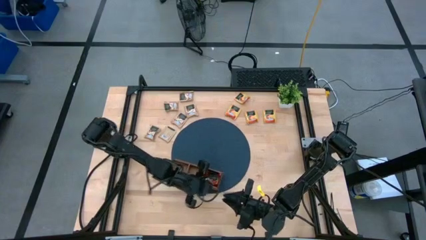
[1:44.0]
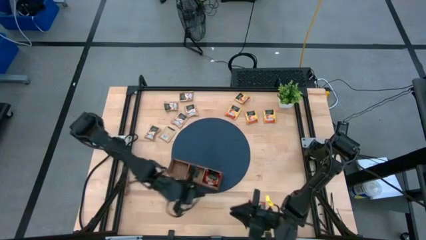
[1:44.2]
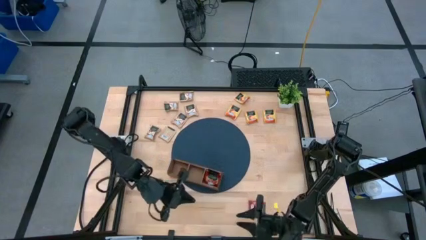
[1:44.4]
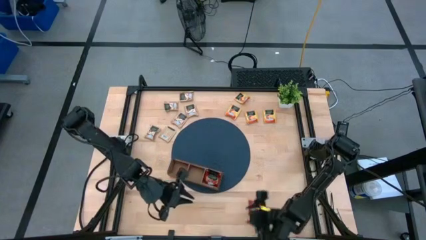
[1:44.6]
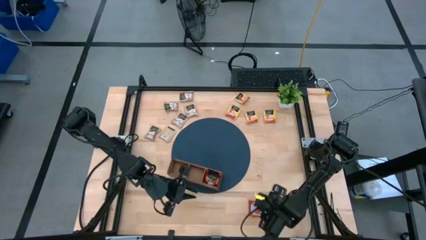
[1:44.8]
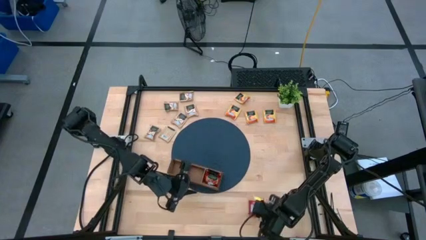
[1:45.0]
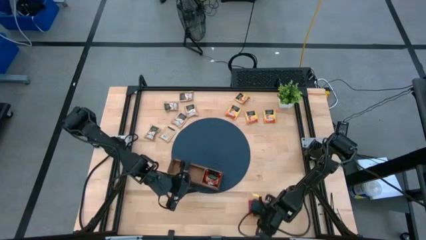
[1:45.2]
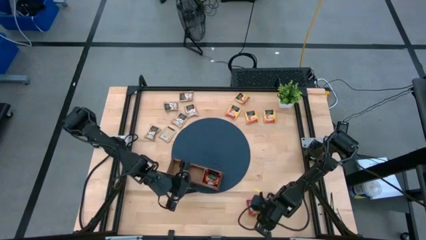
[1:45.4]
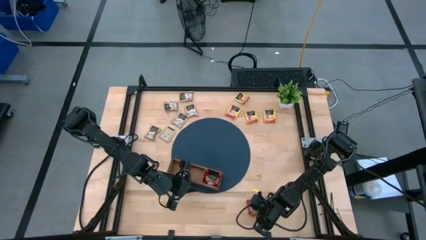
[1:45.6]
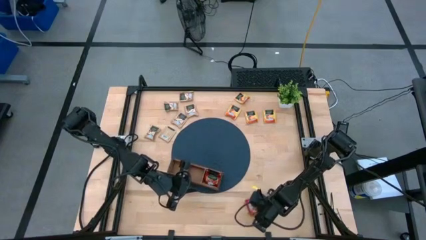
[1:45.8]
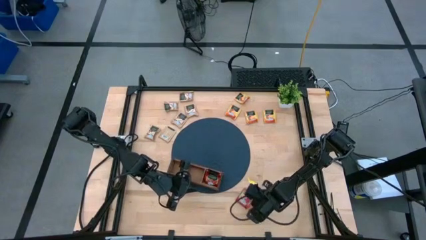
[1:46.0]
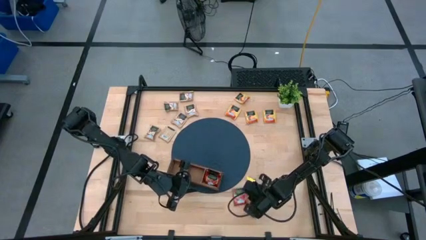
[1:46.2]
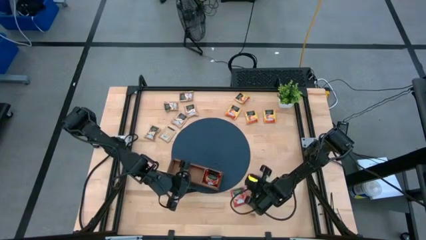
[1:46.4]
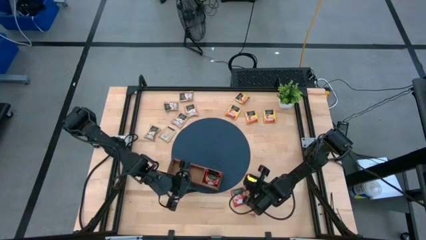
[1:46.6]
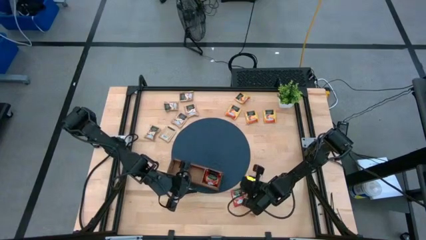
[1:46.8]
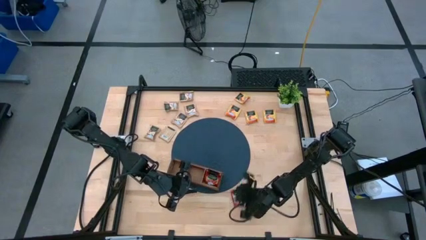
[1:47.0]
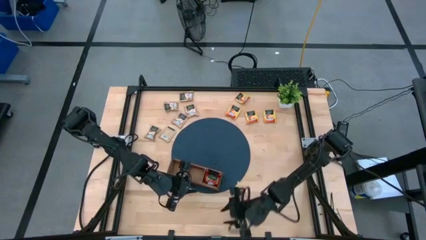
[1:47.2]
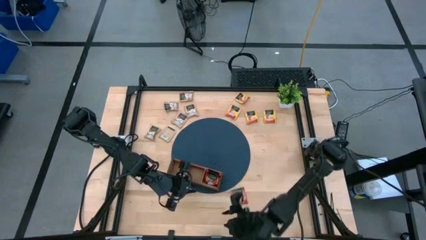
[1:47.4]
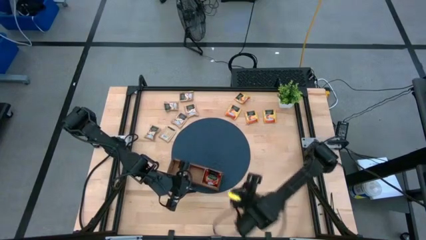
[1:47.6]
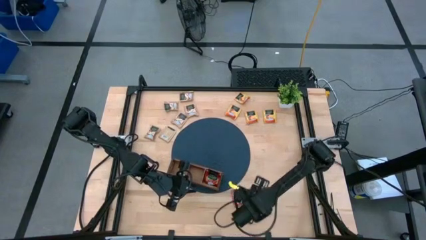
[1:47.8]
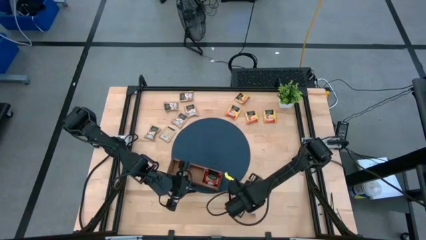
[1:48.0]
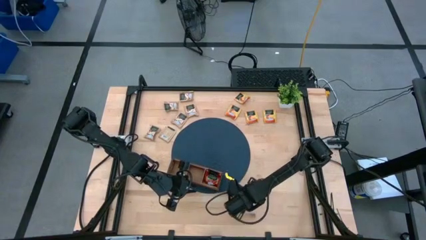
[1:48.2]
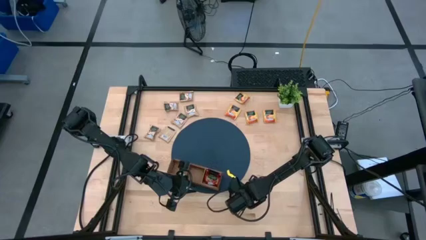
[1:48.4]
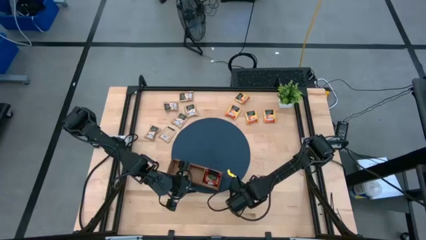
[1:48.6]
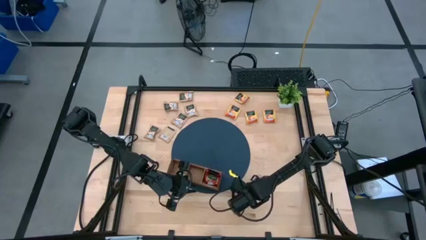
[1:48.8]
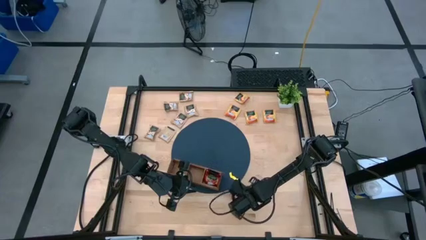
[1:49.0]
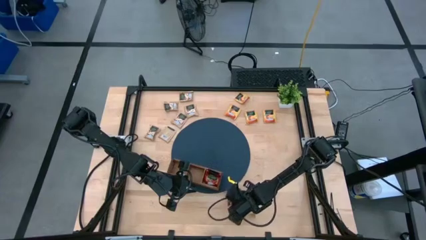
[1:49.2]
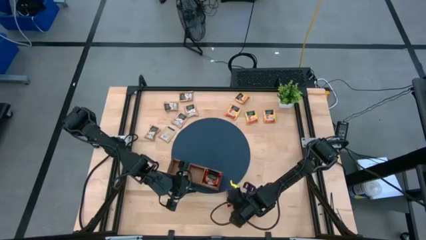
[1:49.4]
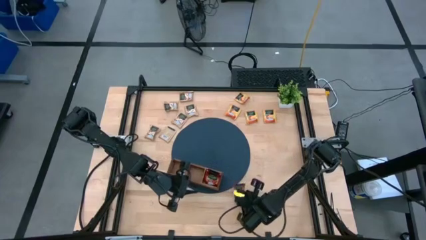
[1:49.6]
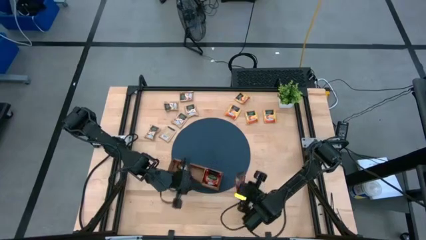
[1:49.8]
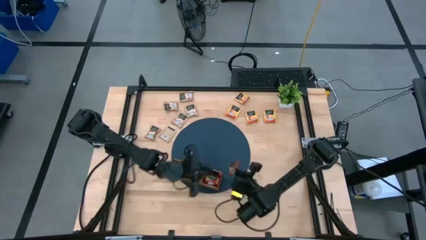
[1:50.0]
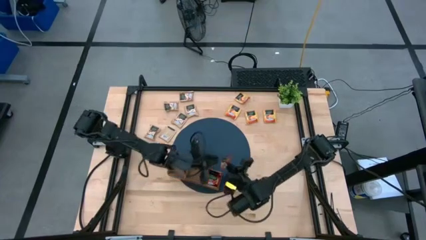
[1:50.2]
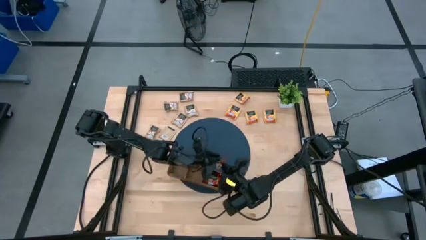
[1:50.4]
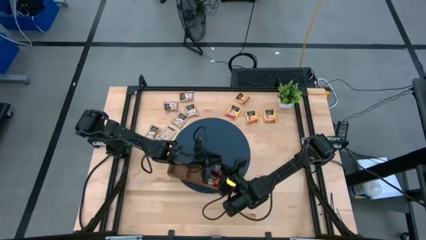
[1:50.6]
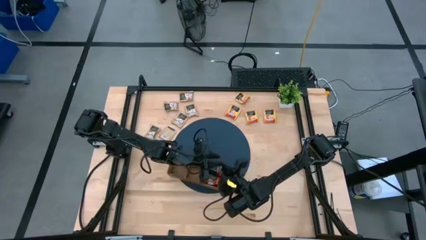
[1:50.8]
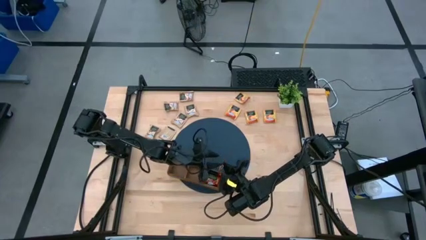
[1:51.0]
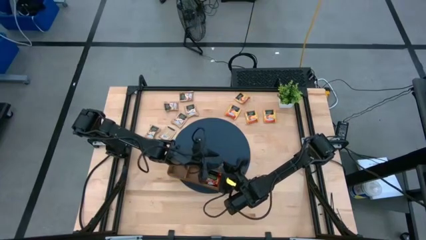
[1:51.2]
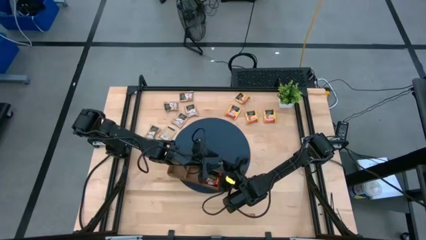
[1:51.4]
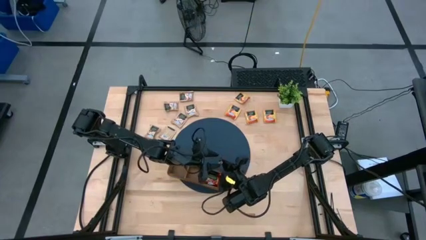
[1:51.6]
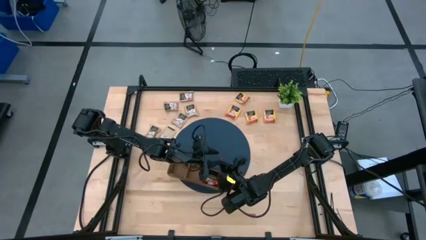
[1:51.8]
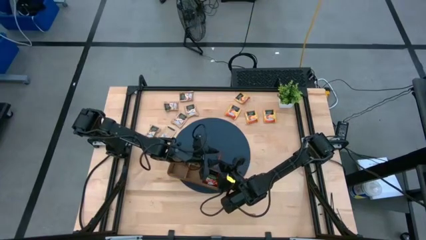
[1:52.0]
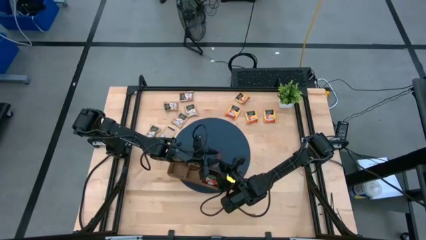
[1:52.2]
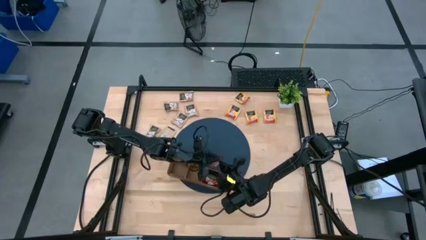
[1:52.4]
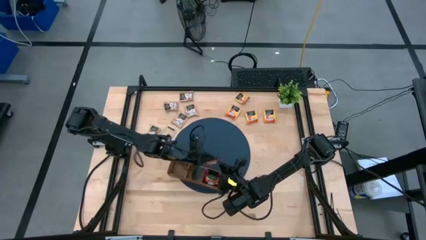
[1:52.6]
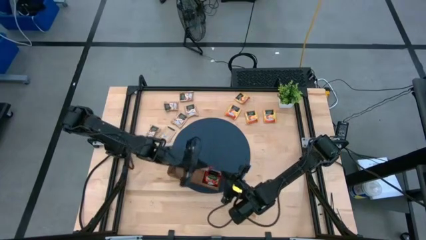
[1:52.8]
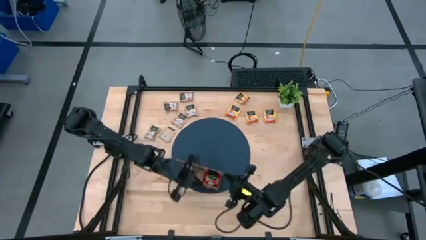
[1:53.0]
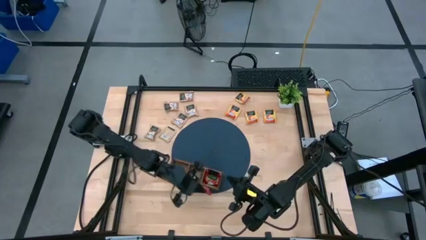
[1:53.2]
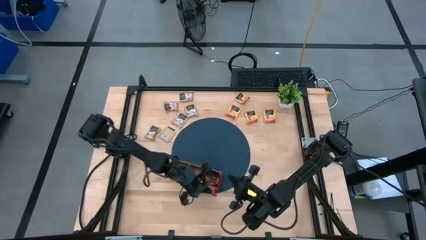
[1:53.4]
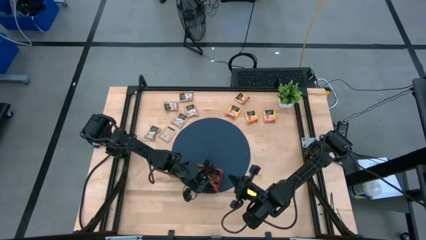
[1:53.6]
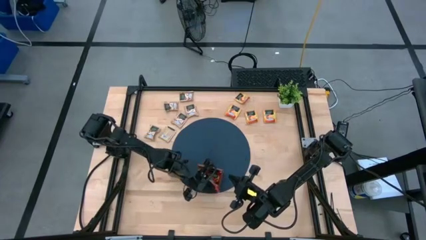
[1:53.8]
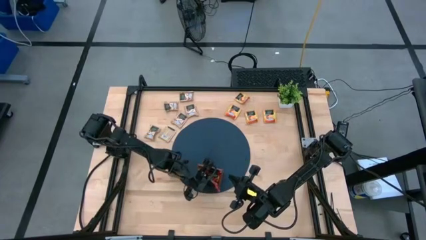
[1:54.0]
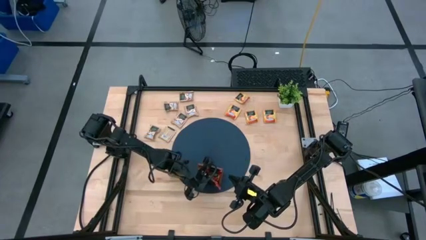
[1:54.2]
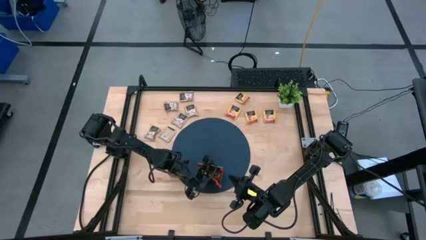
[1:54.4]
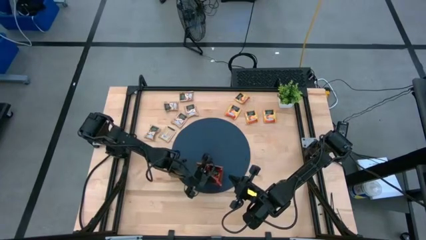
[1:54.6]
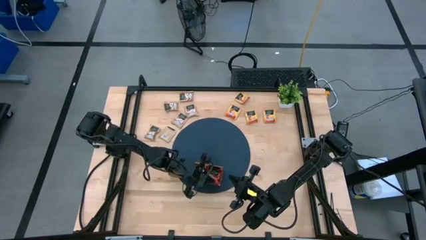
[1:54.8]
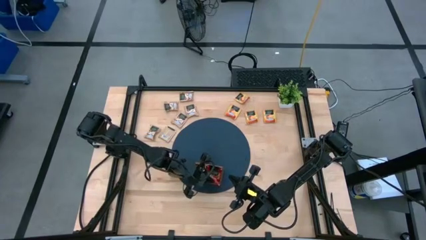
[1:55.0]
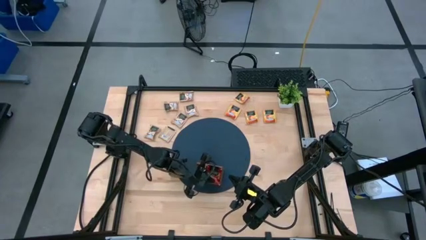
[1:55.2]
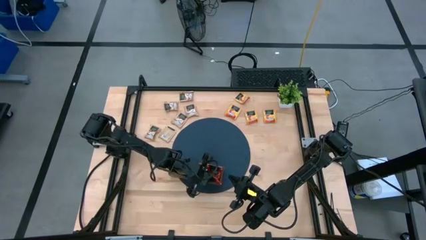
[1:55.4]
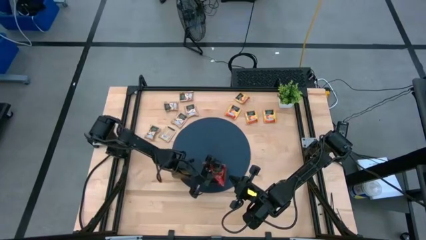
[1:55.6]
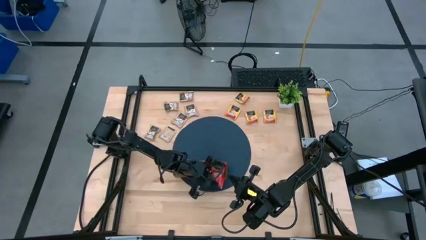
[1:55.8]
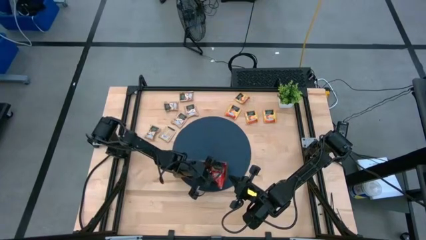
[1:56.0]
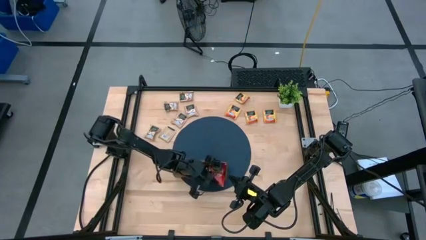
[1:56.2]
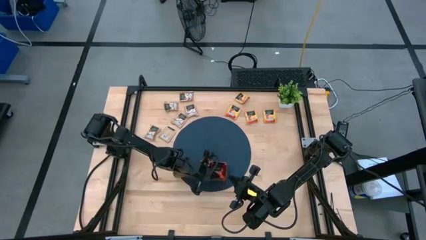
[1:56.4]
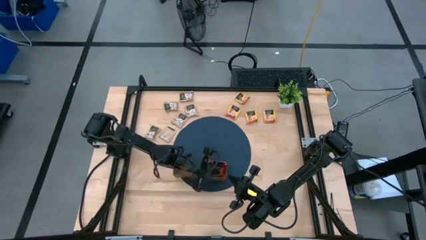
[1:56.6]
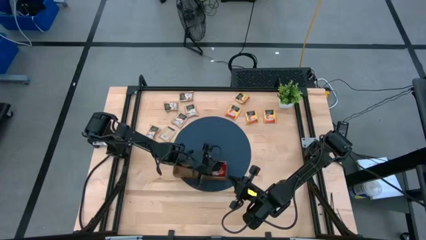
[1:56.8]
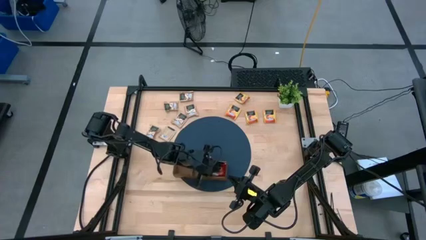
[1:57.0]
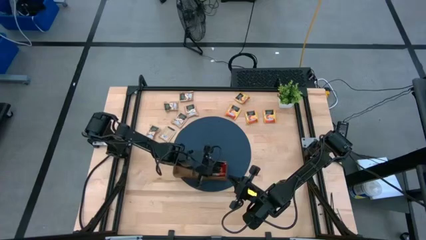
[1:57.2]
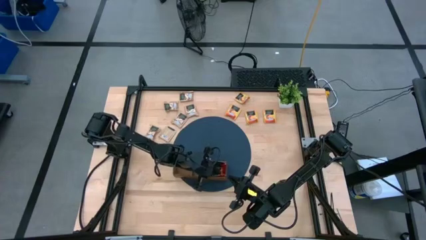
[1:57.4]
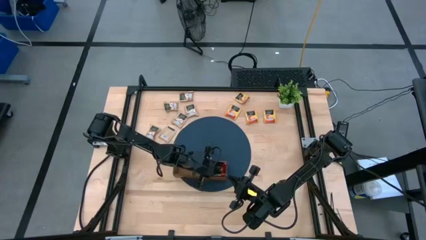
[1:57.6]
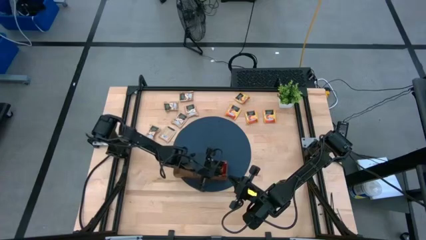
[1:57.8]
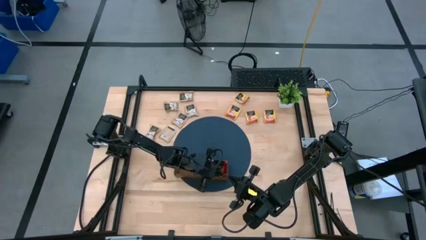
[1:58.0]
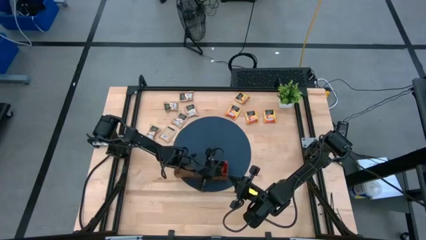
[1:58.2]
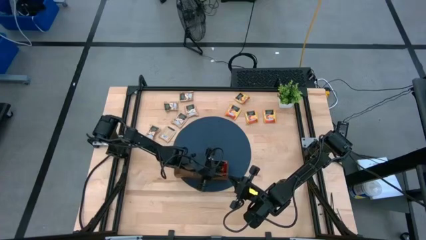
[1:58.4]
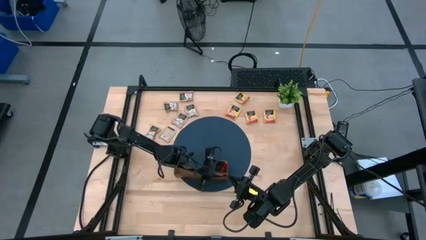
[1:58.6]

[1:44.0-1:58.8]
Task: Pick & Place Tea
Put the red tea bag into the right section of the wooden organizer

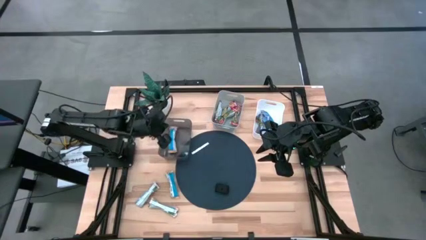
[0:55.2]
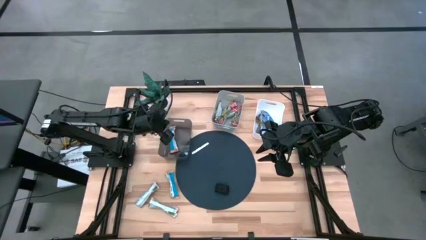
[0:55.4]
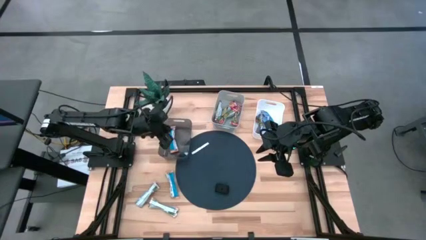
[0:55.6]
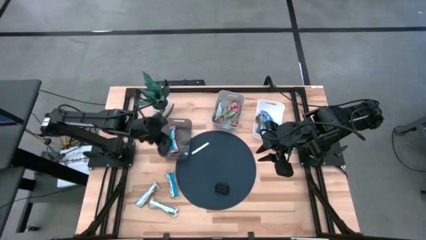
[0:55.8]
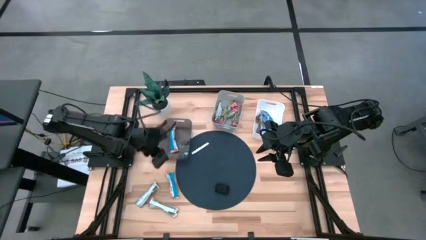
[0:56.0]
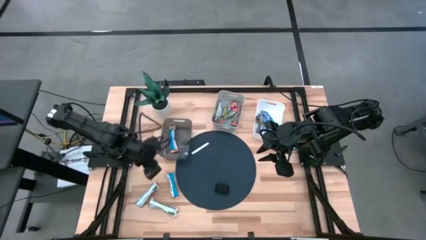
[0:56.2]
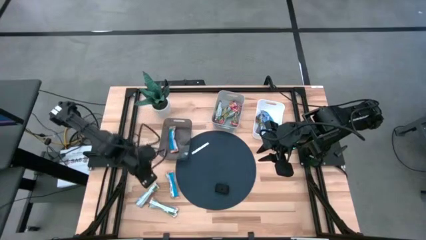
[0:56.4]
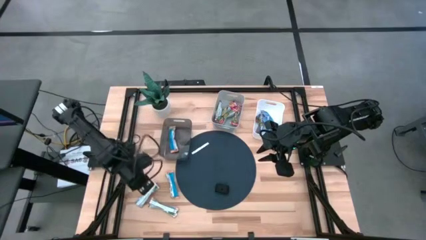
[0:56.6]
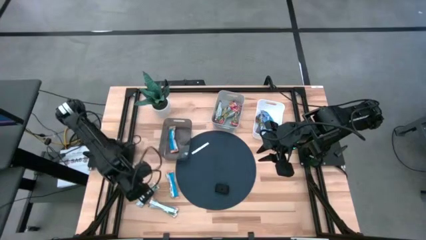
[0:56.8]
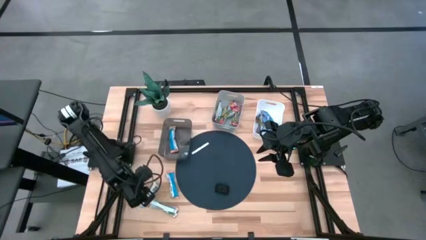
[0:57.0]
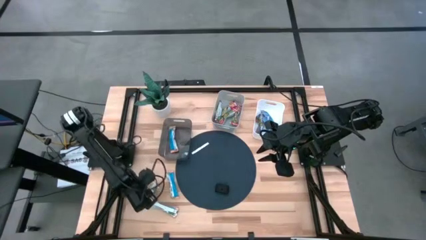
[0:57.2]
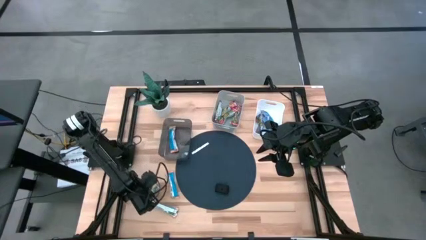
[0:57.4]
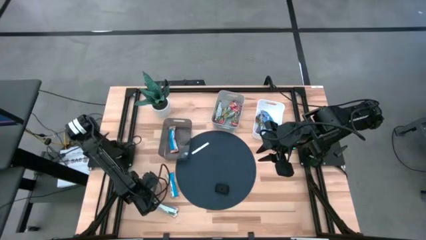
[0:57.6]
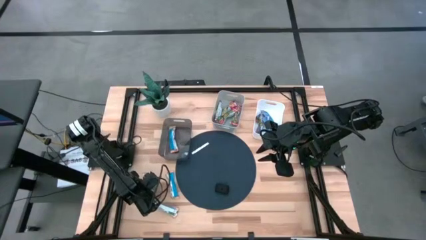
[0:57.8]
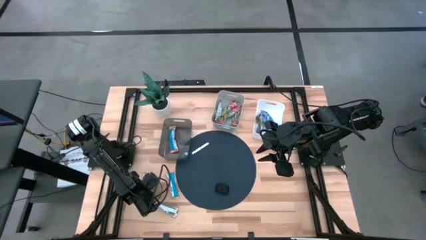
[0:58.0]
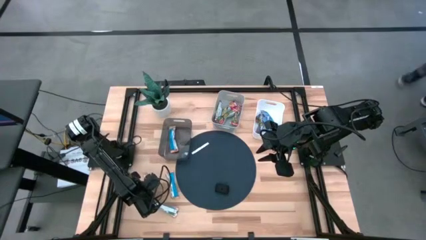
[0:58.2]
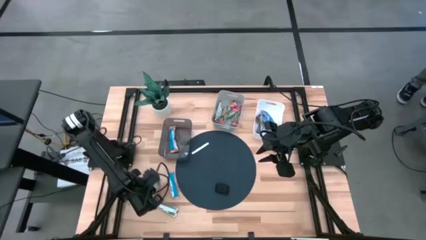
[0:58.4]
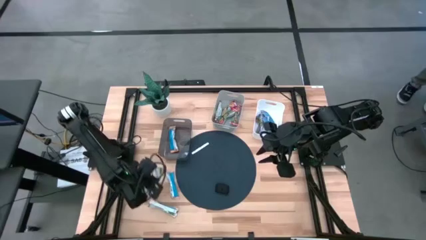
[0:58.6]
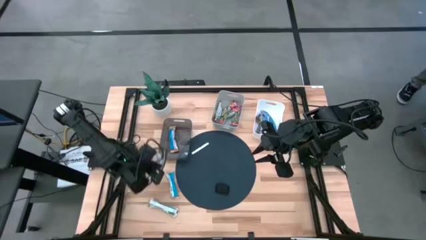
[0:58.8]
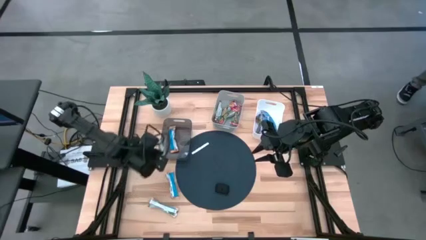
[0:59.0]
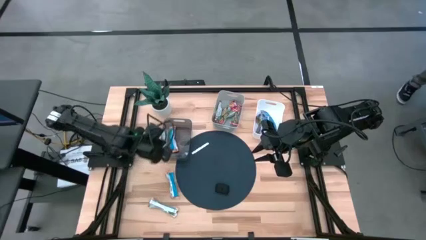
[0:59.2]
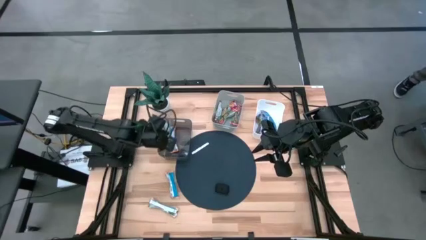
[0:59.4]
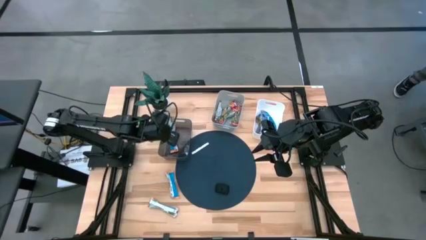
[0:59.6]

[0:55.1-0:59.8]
Task: Pick and place Granola Bars by type
Put the left orange granola bar into the black transparent bin
